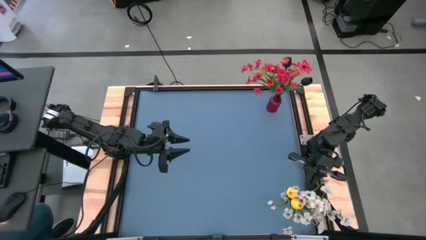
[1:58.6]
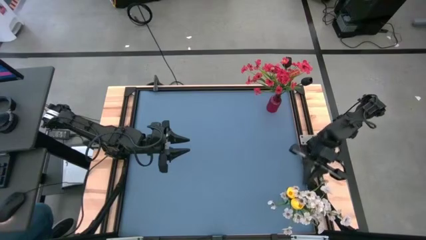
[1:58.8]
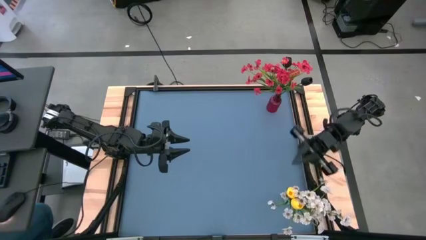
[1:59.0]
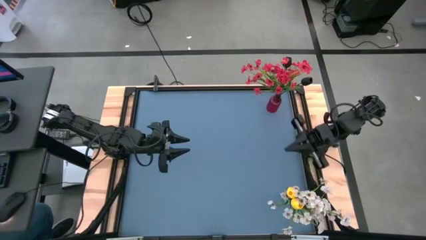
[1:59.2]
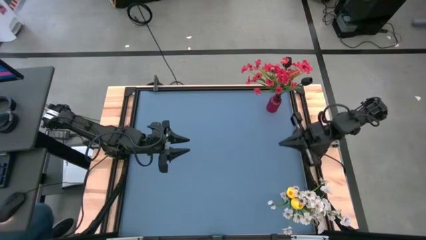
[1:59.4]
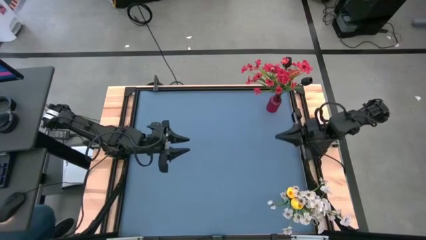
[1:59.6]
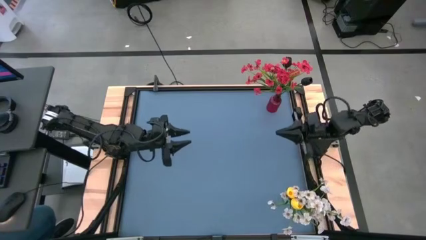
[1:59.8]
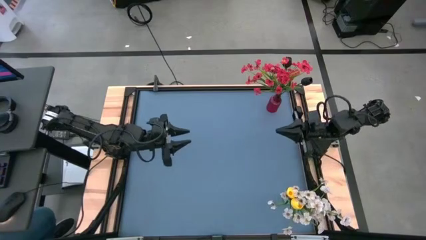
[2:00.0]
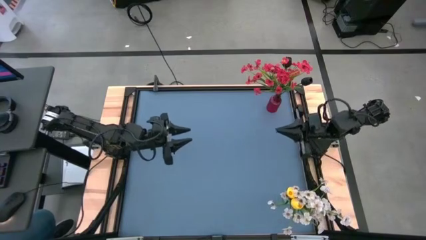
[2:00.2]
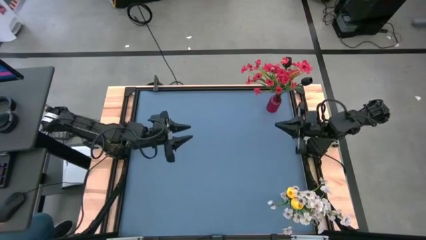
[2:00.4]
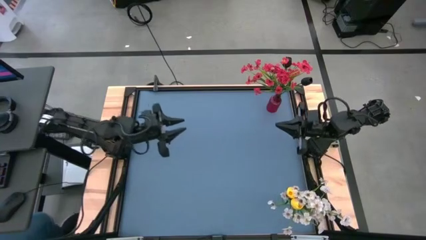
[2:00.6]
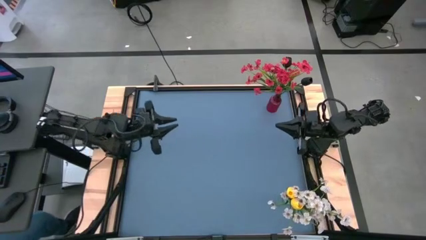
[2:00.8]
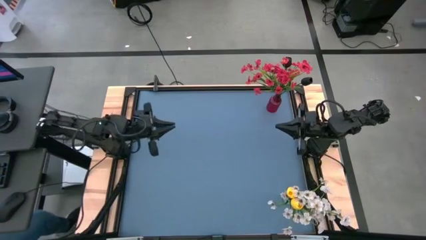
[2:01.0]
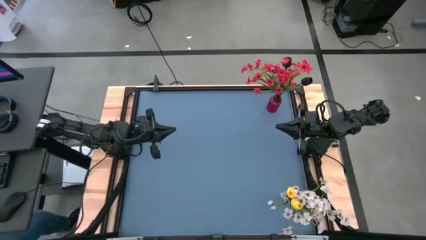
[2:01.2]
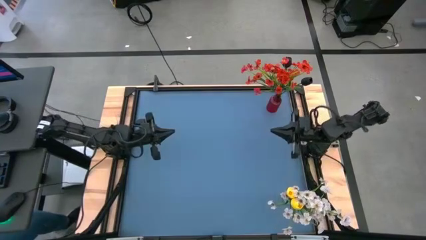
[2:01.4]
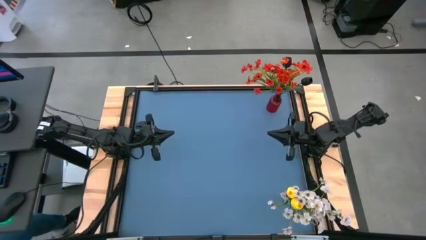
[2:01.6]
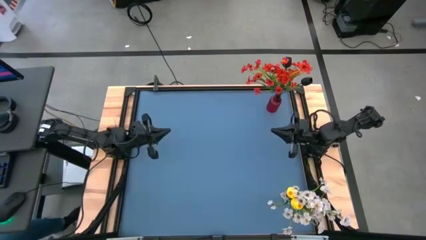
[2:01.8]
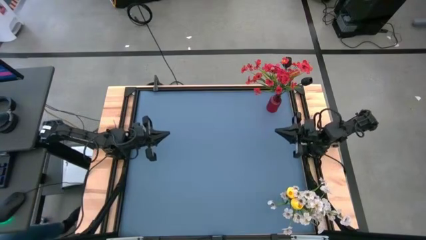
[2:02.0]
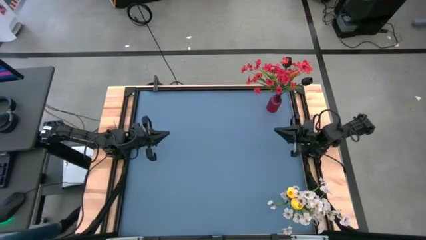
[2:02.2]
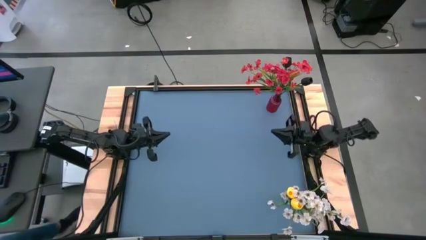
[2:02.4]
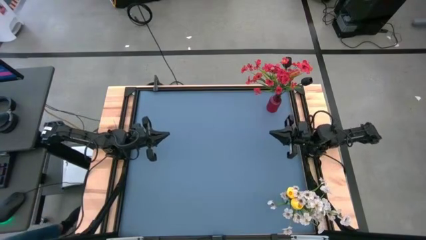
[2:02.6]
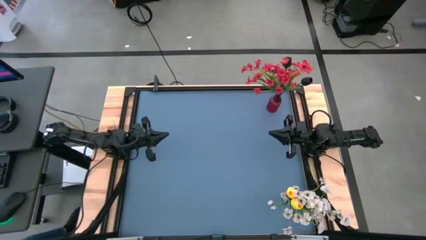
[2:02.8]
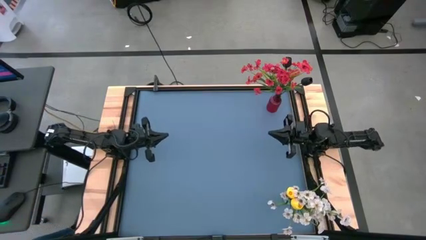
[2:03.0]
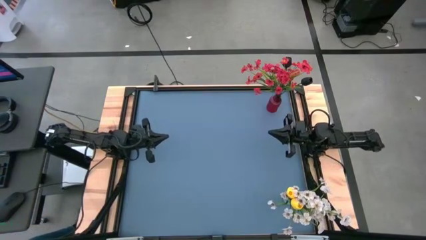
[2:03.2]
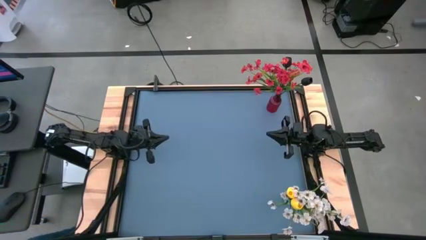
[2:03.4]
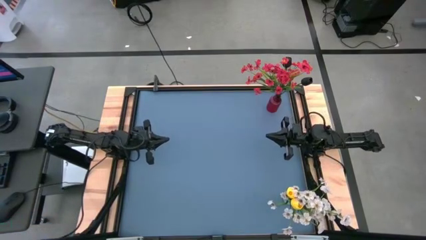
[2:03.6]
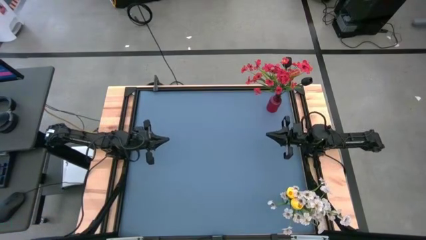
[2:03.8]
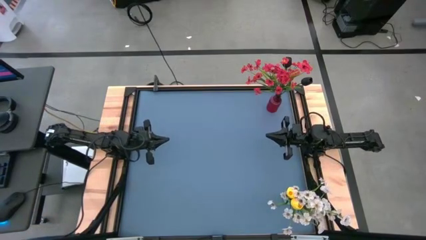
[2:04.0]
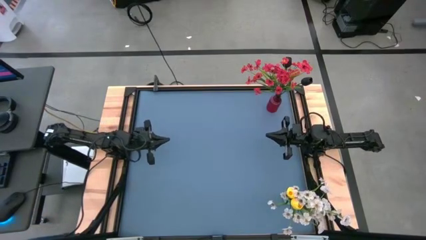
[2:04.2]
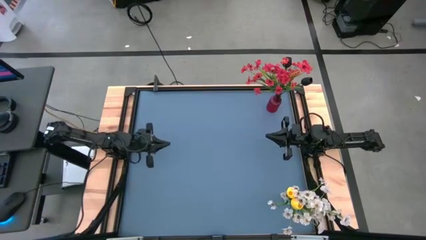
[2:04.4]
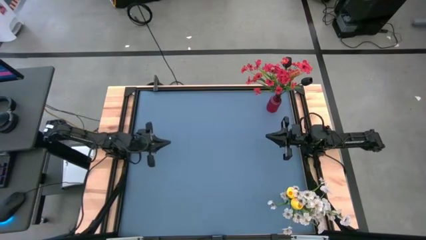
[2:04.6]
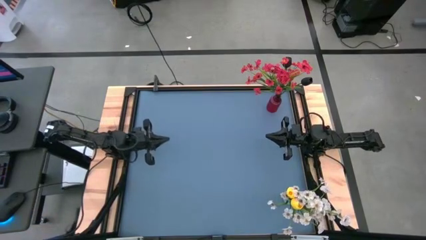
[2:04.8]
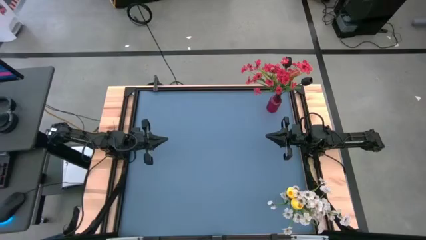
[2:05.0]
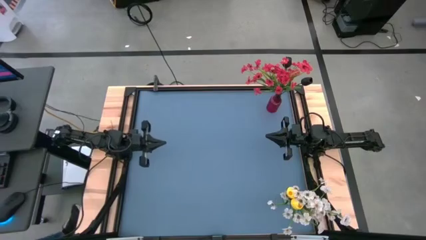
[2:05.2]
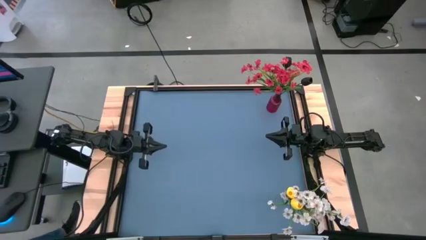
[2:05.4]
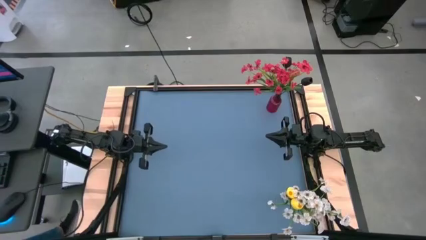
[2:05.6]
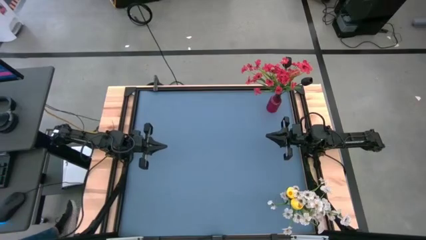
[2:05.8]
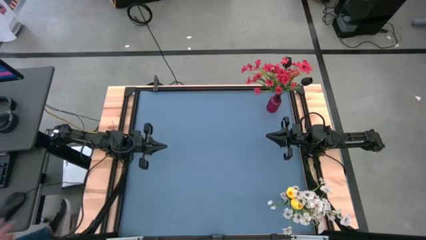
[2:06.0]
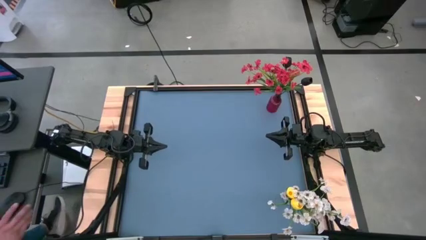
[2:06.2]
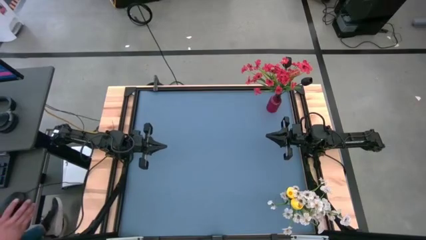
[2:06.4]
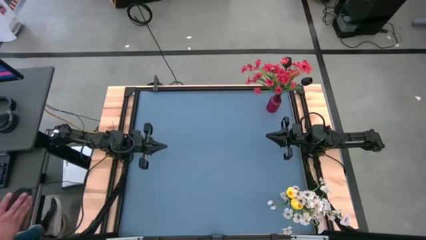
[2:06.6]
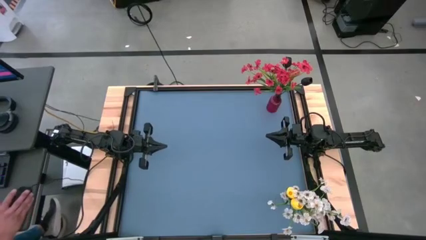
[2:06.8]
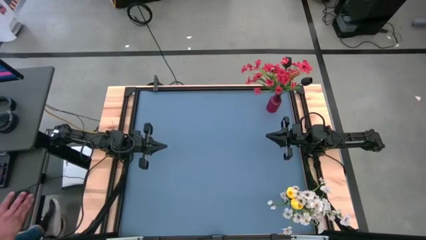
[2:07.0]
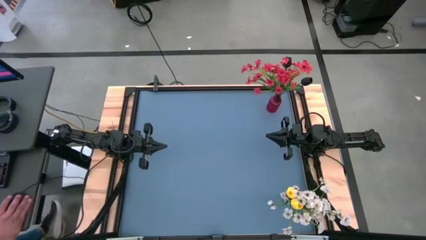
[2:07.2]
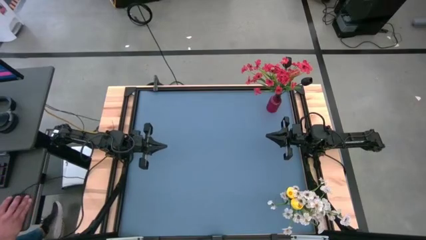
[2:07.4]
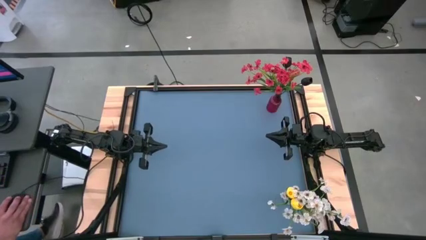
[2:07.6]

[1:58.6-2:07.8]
Task: Sort flowers into vase by color
Return to home position

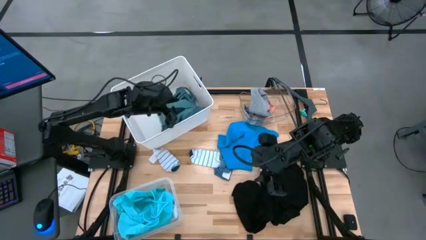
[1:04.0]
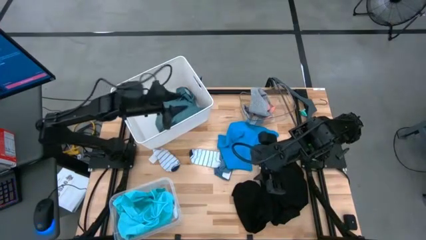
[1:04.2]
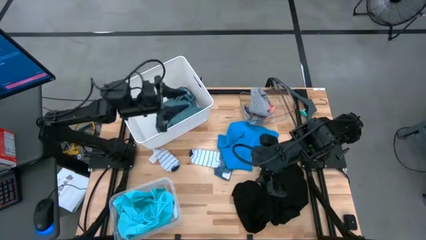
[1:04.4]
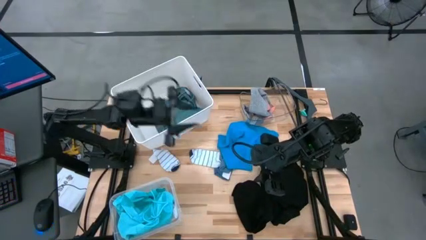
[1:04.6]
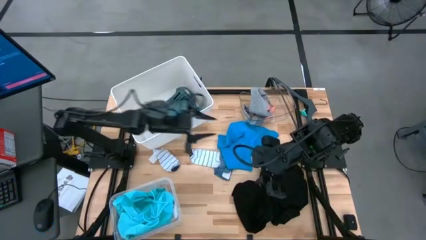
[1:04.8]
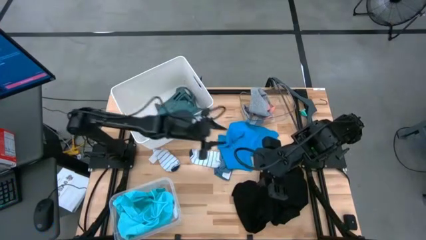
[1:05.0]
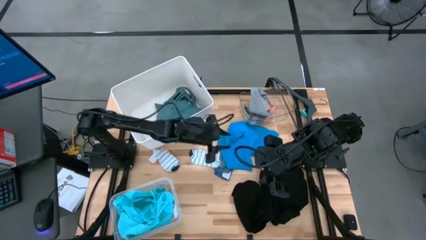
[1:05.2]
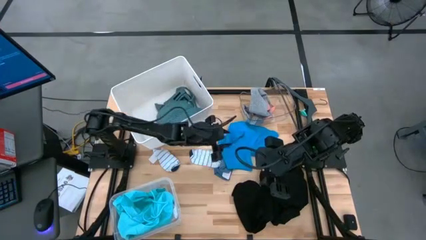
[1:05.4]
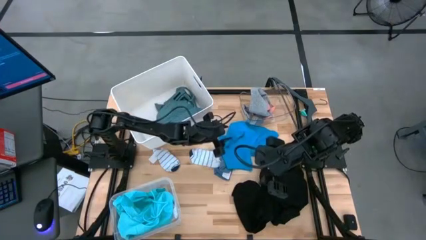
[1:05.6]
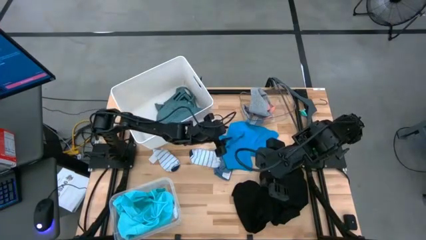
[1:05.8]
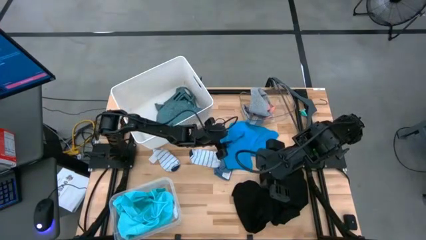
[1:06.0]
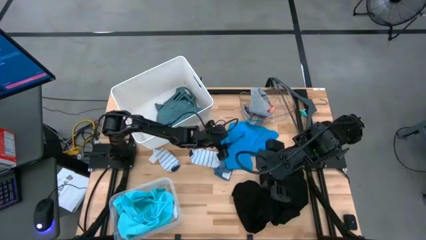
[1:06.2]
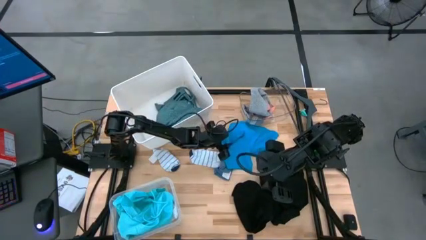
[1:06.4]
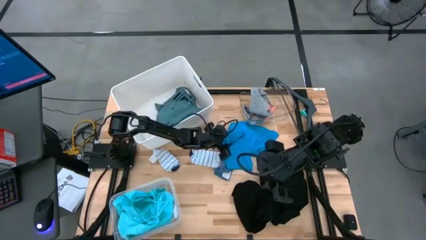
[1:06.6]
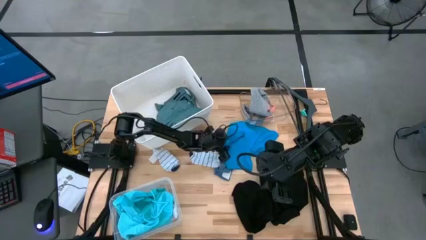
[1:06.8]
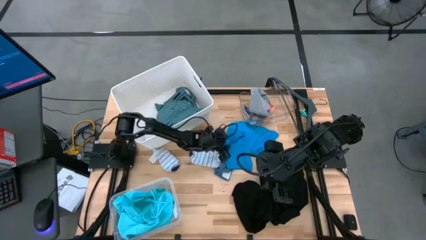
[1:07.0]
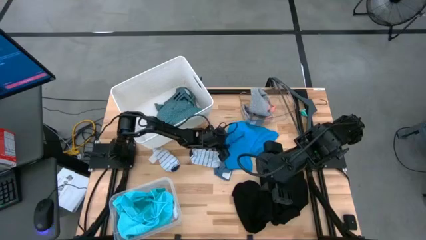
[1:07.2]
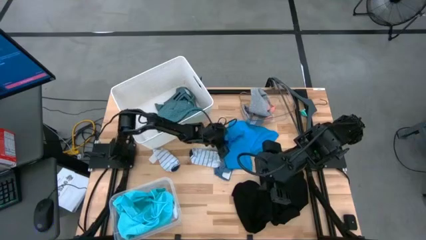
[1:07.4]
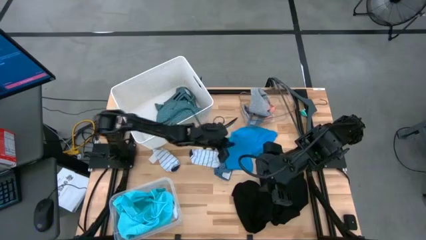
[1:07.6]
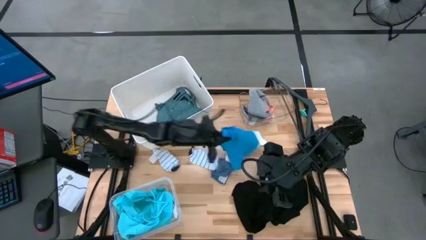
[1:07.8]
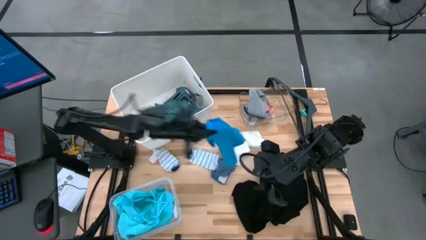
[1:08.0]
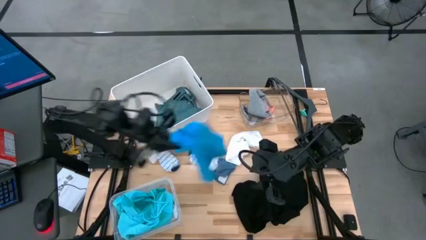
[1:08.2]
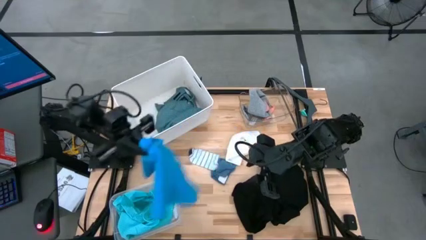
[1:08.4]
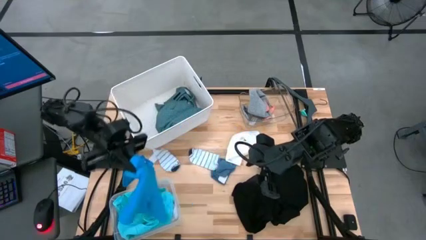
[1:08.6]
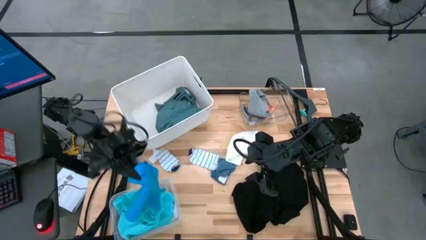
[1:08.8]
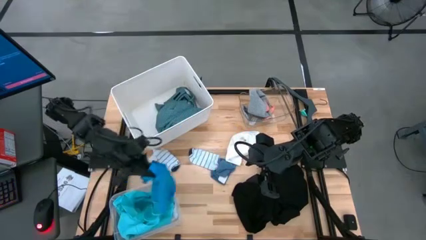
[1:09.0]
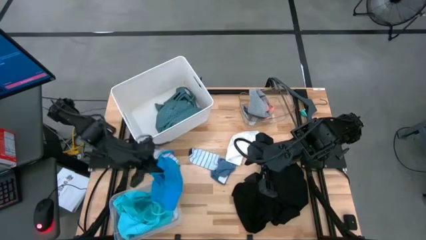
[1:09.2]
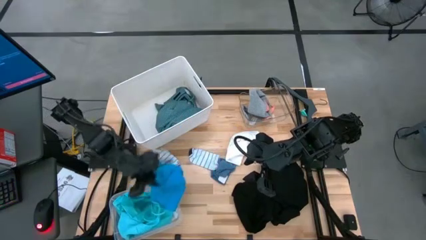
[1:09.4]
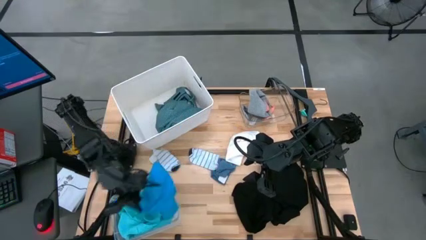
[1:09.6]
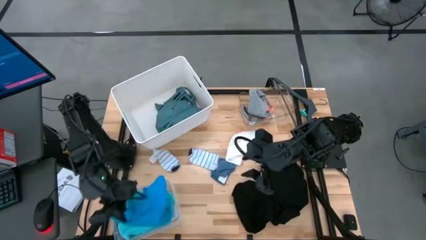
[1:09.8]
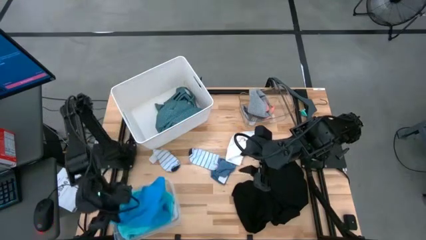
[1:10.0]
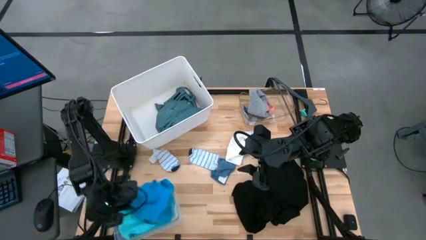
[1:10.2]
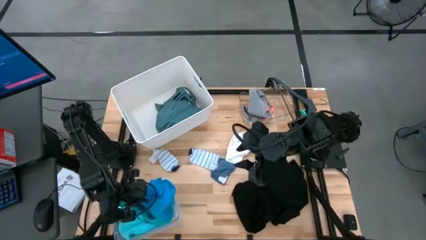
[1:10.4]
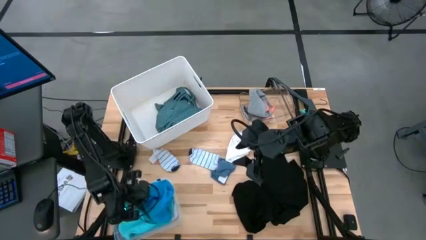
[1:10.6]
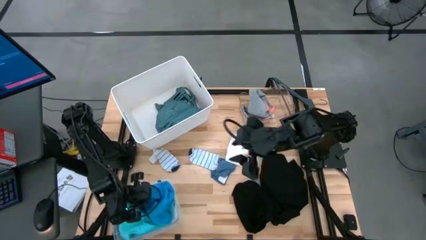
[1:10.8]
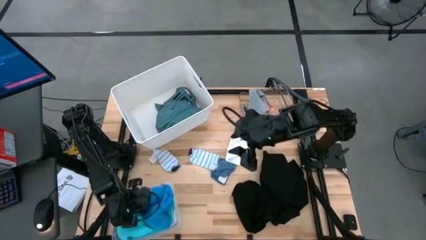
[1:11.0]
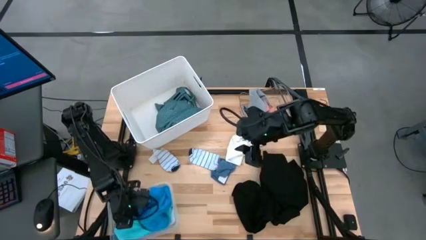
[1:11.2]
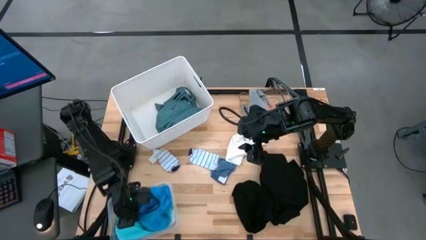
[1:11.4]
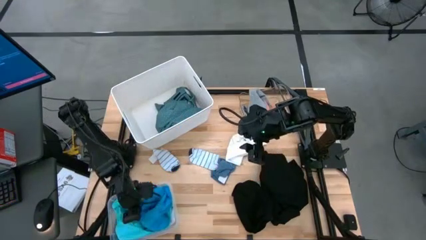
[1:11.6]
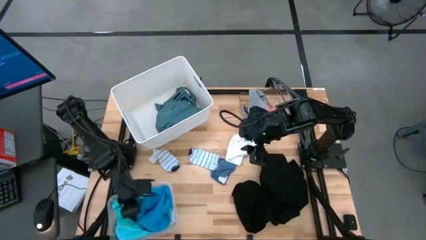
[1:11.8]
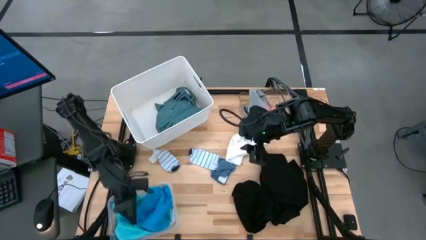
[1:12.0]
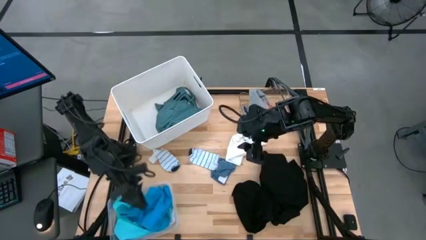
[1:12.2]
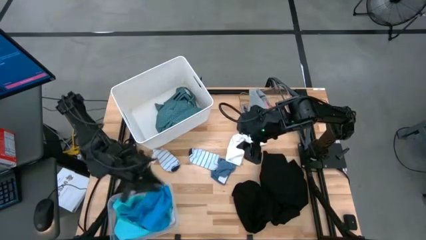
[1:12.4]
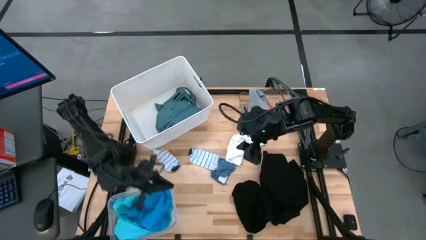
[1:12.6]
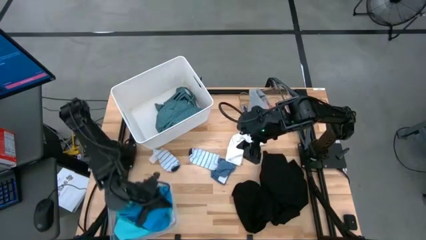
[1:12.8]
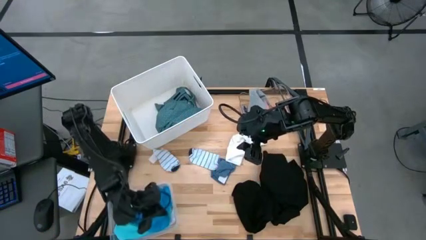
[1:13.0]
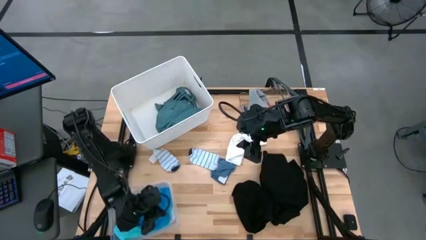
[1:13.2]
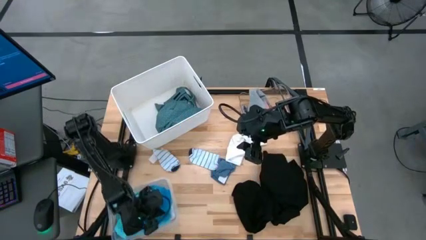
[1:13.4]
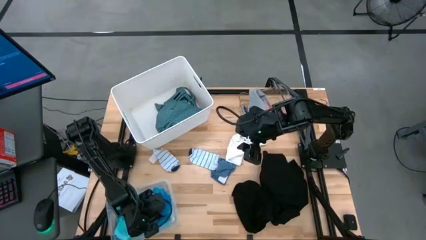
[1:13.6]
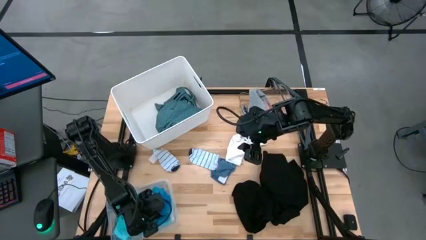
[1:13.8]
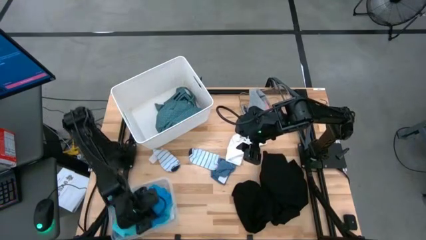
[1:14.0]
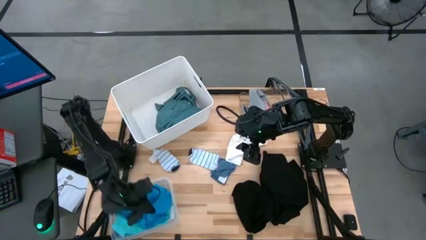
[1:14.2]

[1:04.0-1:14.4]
Task: Pick & Place Cloths
Put the blue shorts into the bottom transparent bin
